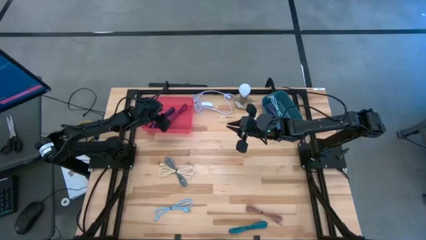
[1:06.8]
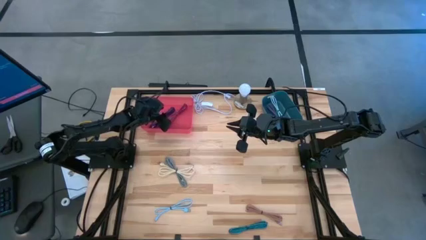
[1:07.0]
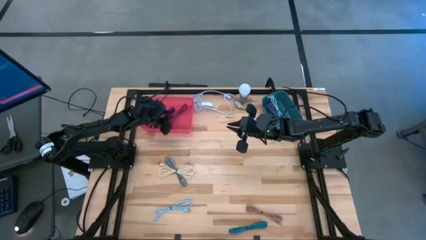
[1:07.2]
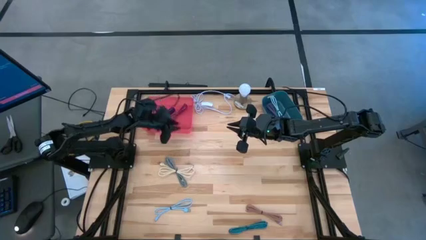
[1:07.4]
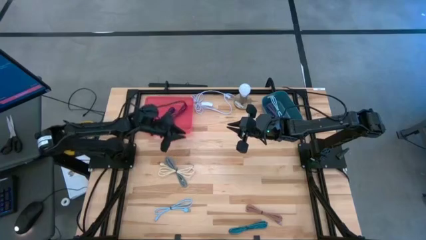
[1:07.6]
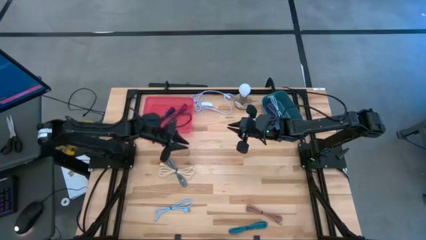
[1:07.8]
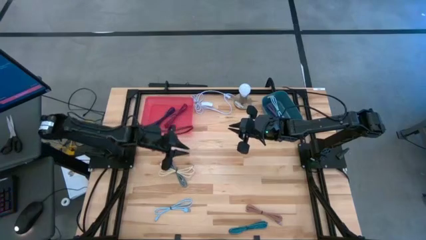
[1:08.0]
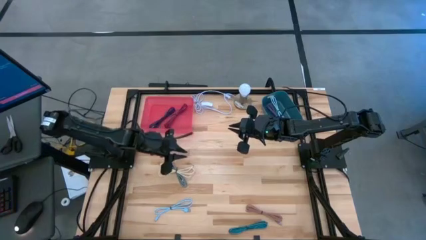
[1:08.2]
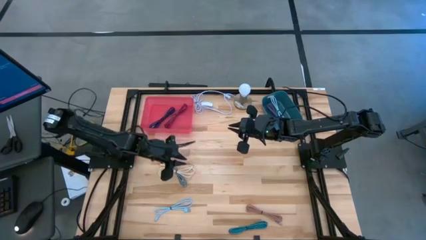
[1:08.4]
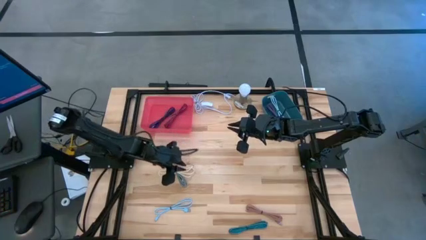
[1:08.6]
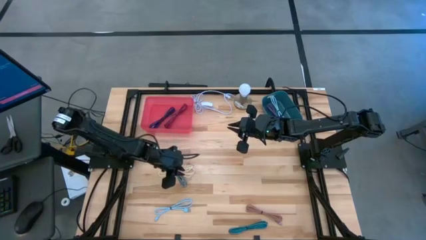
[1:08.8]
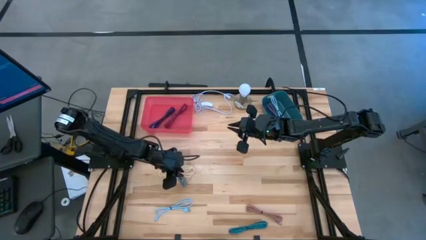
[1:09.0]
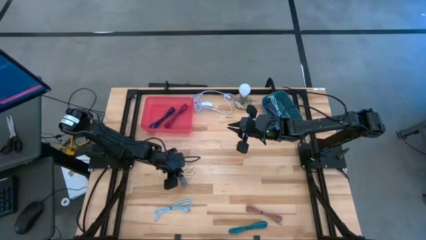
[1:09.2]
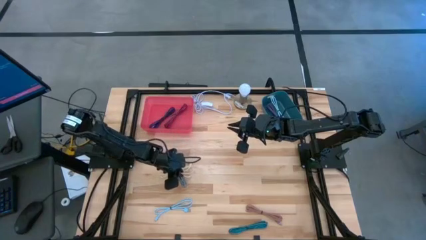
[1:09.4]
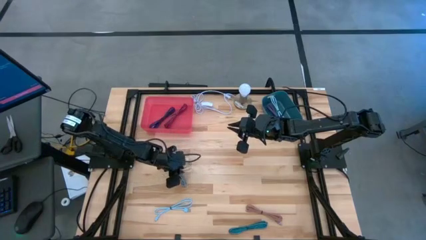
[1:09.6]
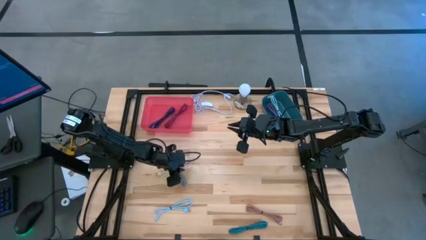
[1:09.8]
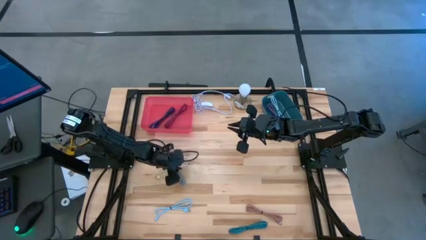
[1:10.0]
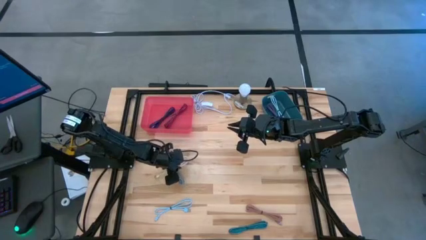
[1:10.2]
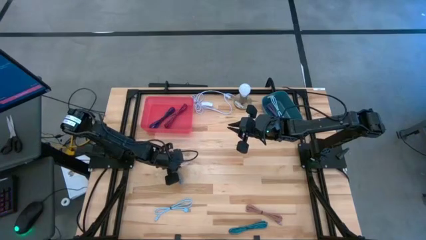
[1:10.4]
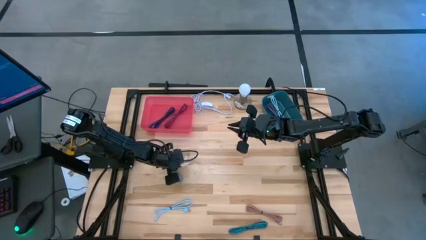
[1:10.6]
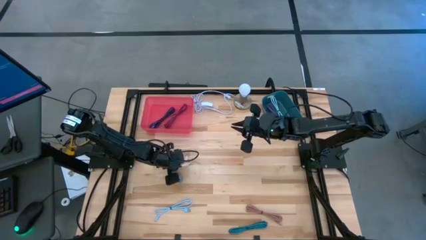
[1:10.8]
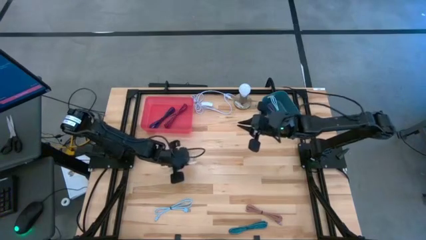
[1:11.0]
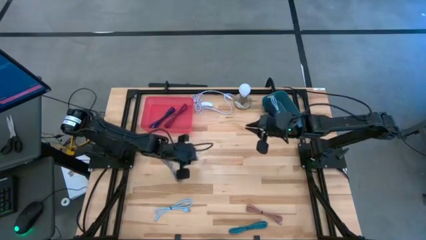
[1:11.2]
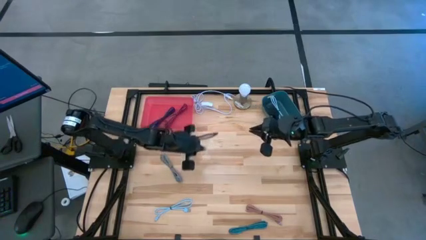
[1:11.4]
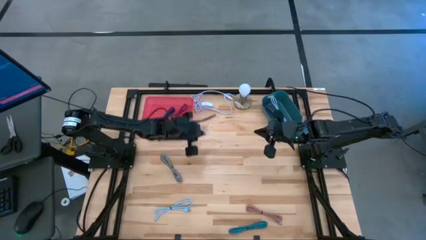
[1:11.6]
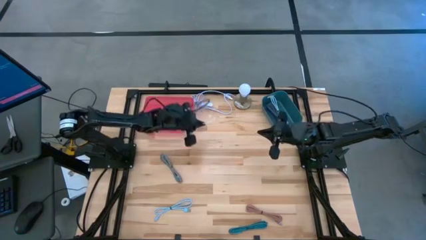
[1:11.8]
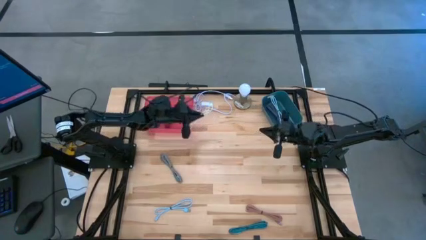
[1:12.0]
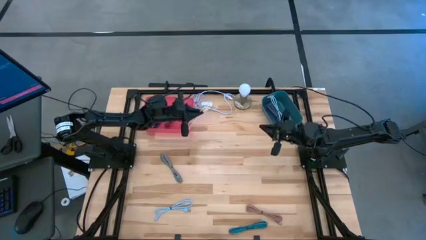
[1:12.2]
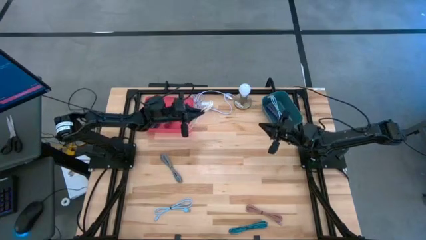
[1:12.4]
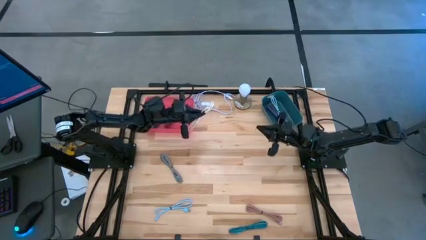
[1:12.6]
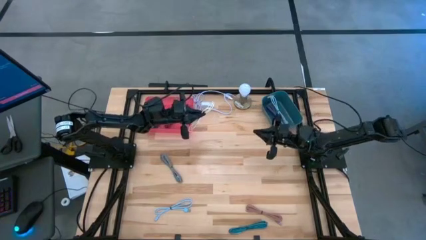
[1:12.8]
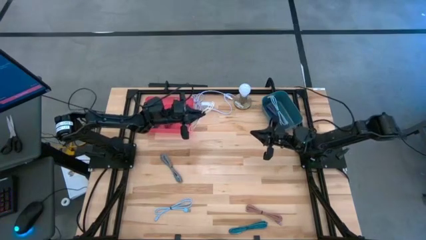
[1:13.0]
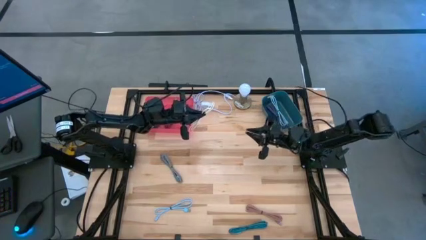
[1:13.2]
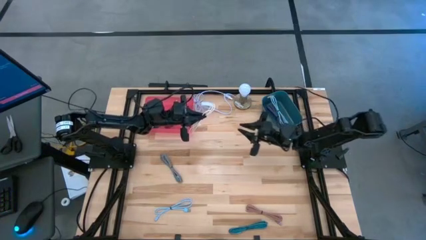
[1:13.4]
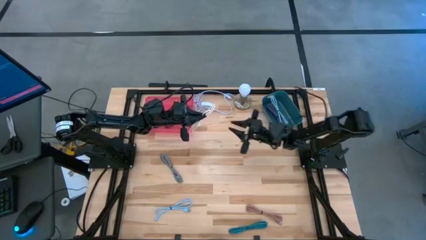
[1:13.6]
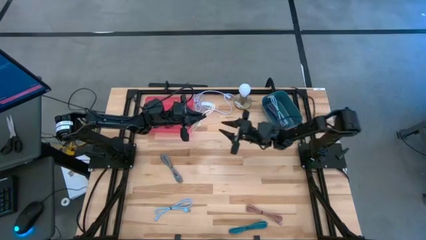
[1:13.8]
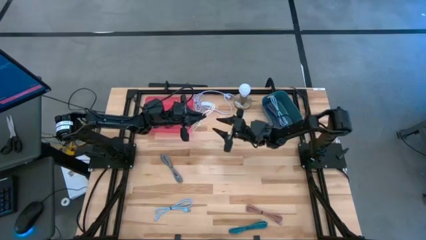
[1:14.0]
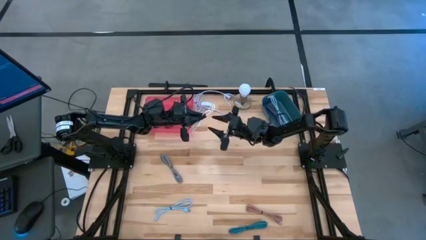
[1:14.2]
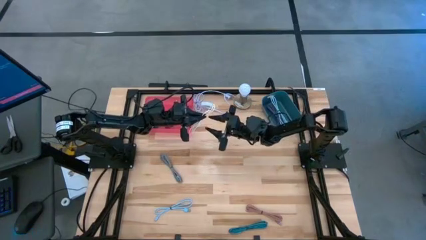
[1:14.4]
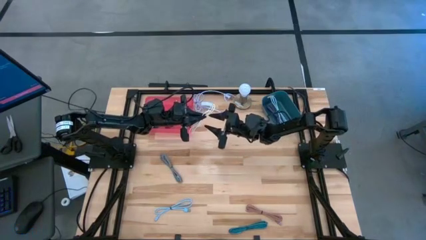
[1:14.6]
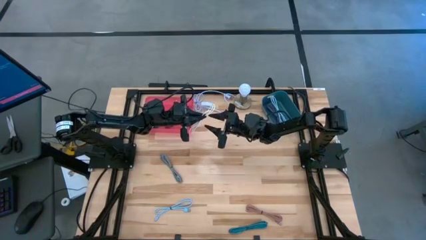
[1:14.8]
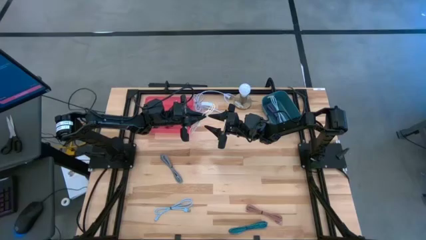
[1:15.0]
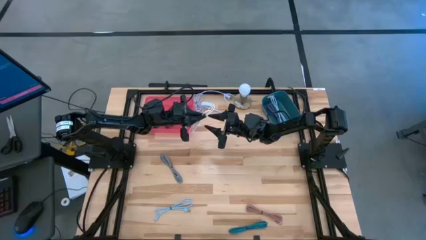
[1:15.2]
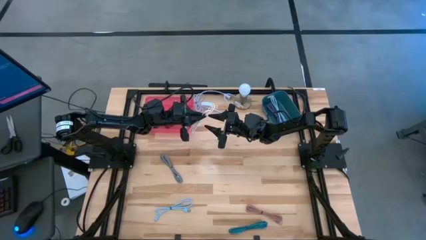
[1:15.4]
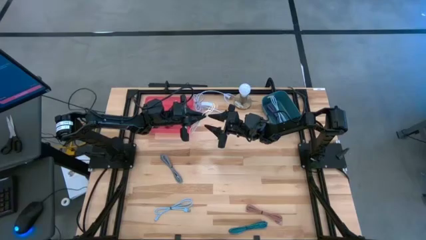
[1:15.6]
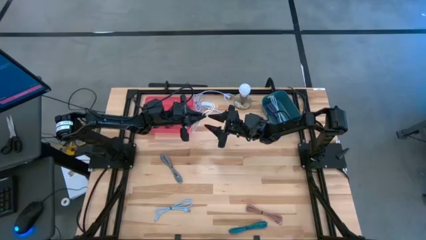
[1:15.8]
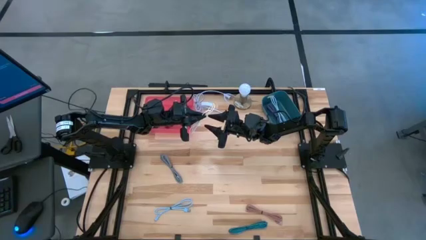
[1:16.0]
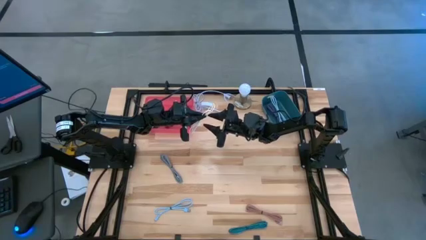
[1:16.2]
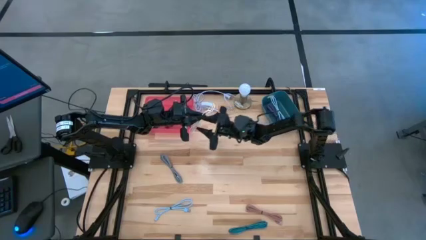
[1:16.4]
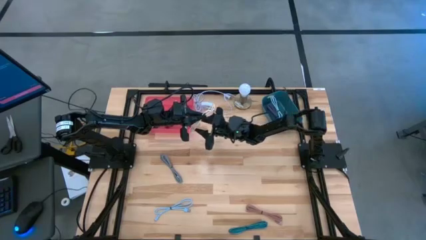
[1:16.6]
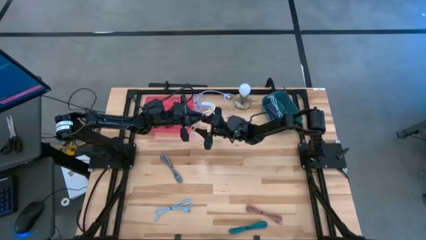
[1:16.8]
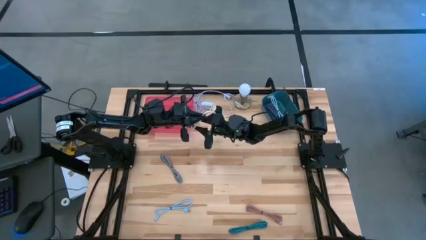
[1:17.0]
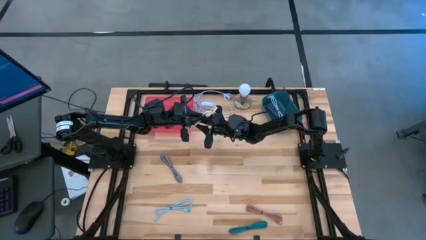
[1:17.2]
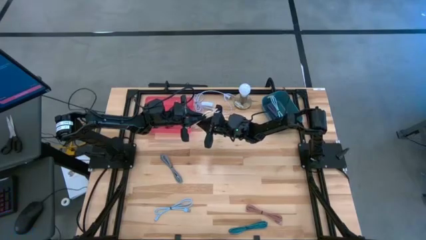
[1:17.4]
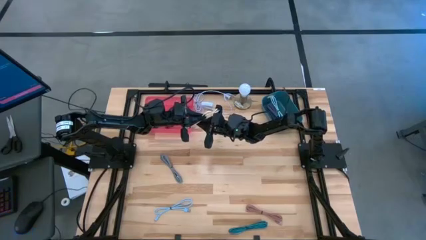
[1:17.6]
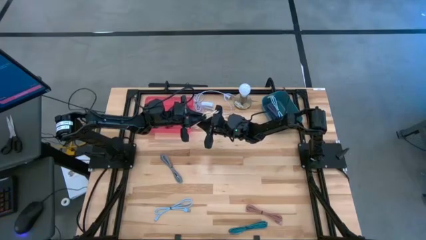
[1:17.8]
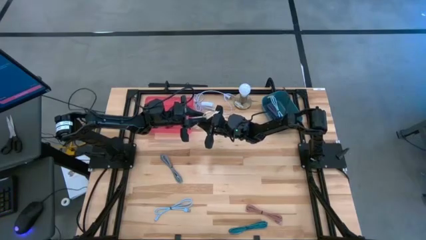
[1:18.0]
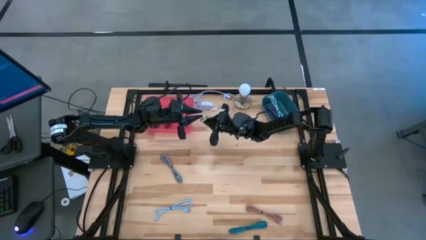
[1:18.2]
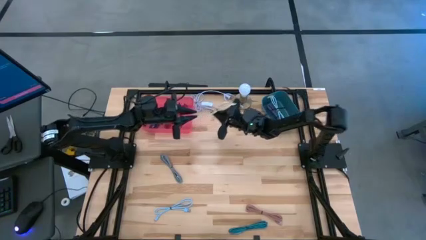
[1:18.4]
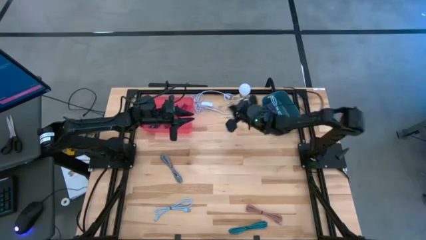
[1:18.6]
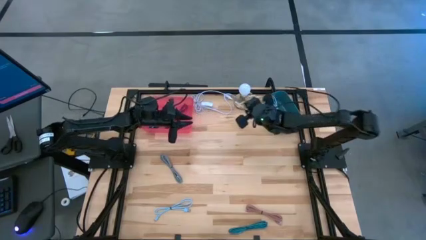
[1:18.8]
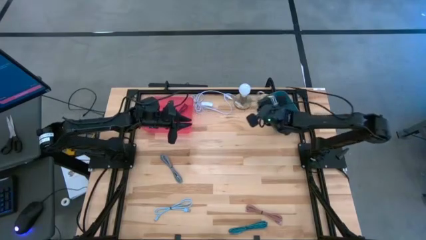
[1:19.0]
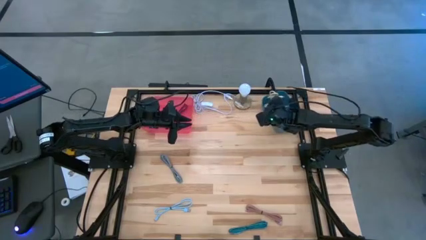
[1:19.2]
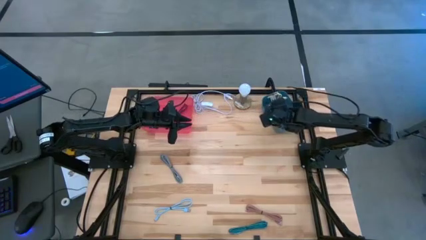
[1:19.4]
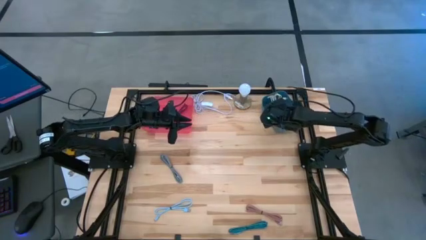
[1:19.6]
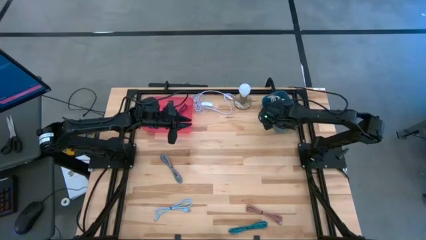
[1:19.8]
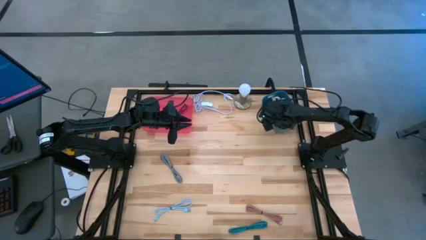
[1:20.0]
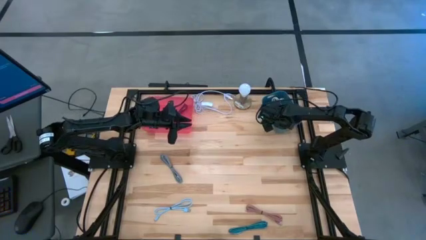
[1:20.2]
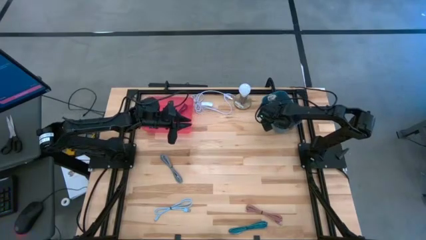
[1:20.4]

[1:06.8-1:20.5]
Task: Pick & Place USB Port
Put the white charger cable into the blue bin

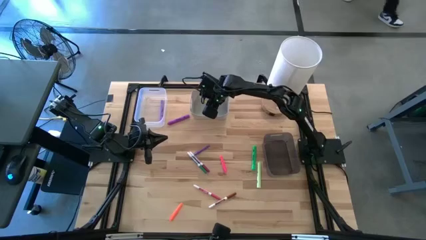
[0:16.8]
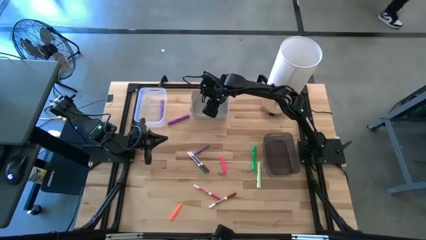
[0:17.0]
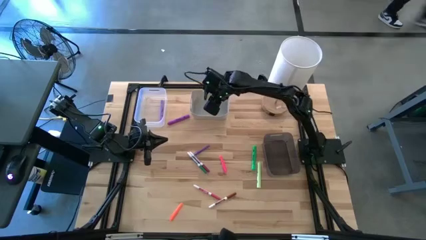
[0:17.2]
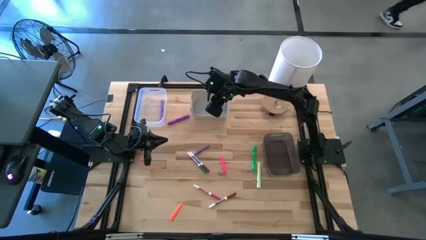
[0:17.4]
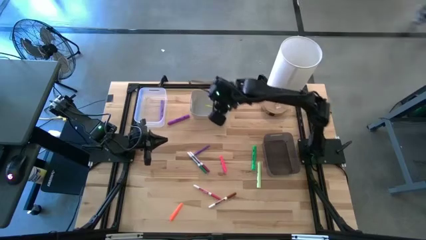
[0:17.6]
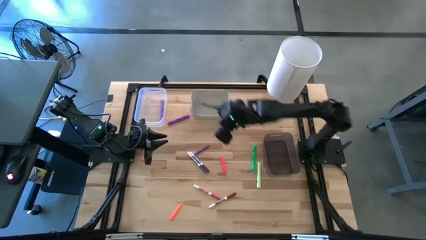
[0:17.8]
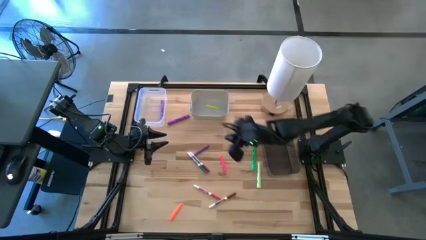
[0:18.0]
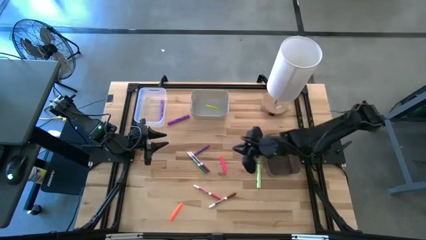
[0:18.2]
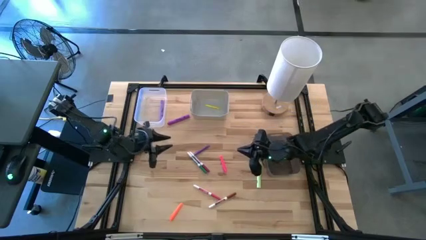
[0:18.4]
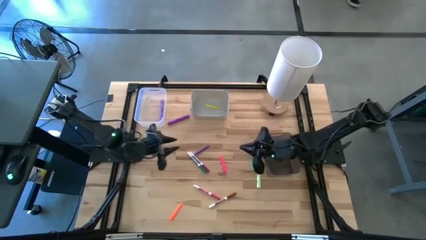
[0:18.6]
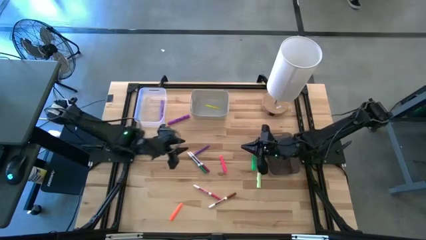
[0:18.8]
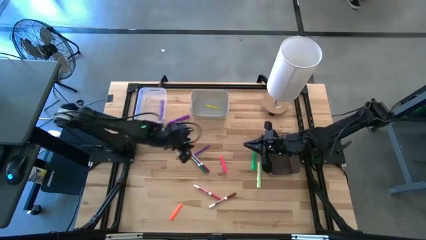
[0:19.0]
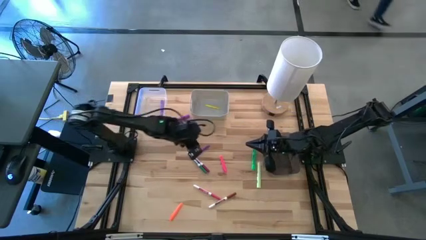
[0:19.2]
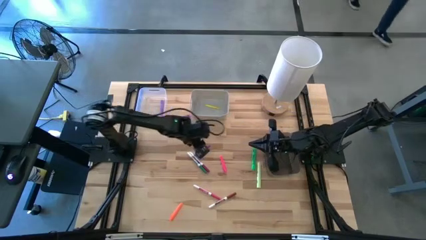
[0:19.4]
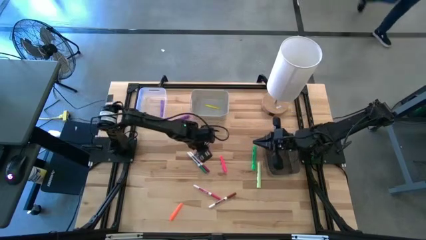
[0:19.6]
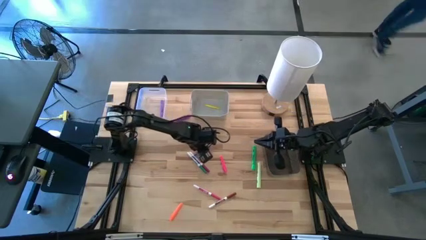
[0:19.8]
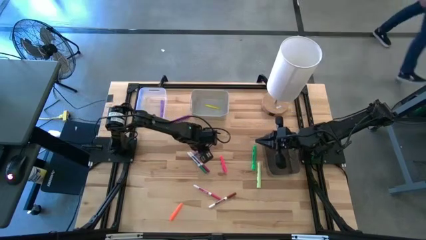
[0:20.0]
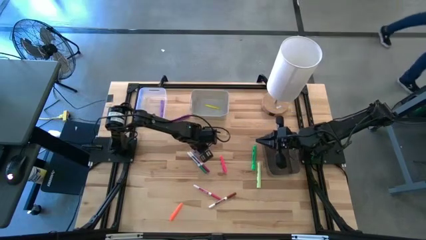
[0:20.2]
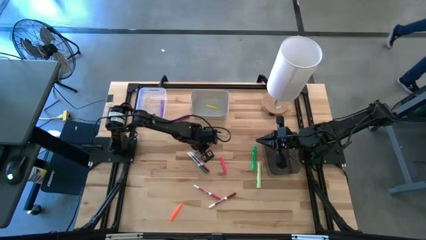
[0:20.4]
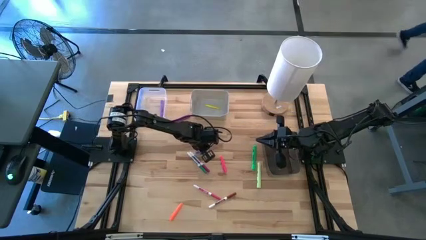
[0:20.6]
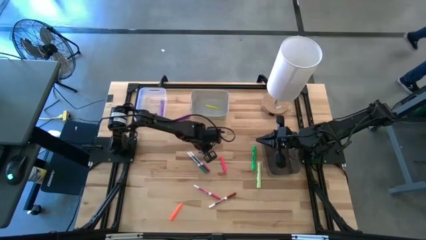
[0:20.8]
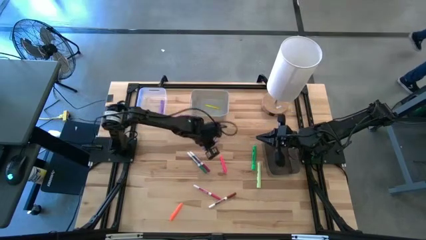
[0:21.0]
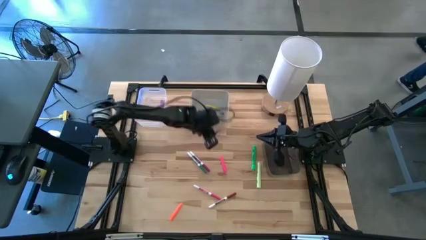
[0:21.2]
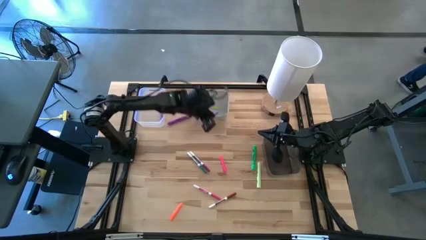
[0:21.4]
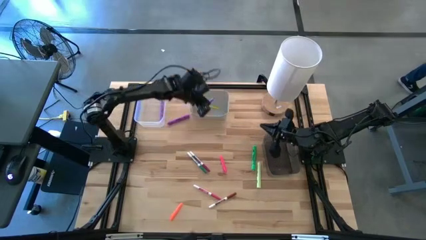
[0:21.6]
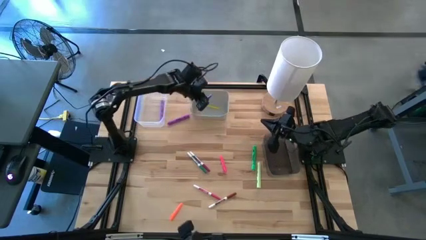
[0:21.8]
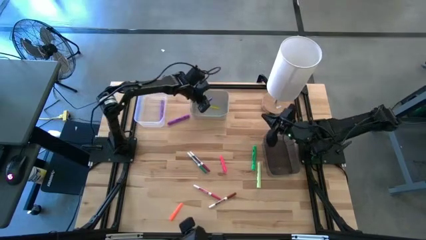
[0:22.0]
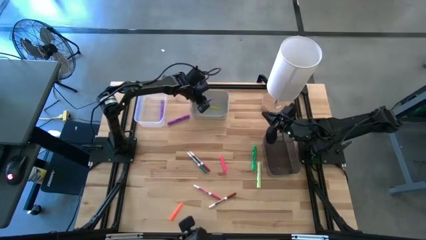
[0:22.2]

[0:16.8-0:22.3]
Task: Pick & Place Markers
Put the purple pen into the gray bin
